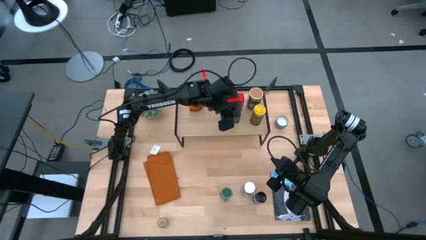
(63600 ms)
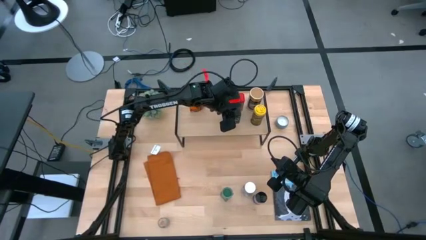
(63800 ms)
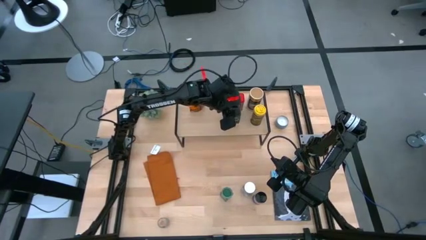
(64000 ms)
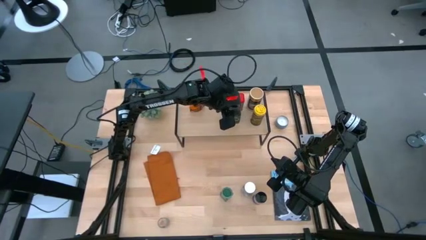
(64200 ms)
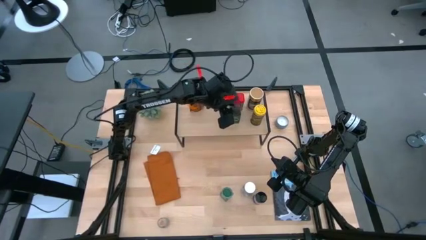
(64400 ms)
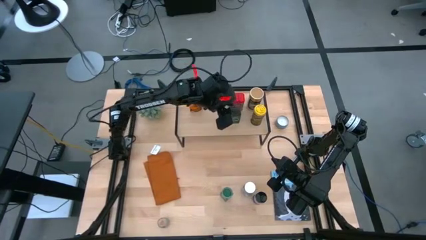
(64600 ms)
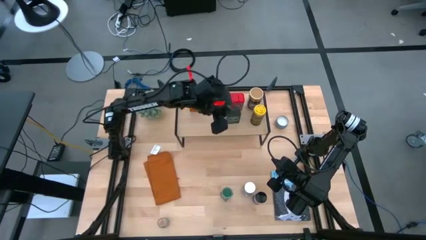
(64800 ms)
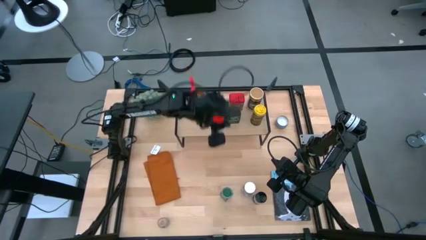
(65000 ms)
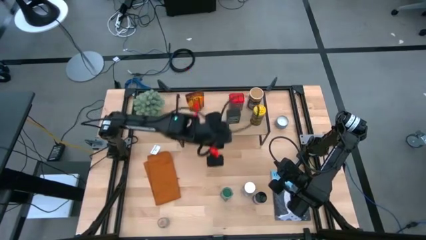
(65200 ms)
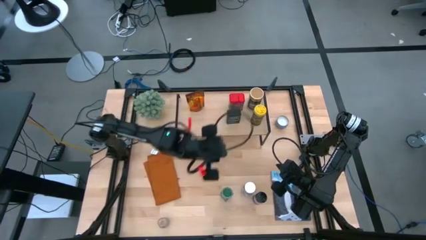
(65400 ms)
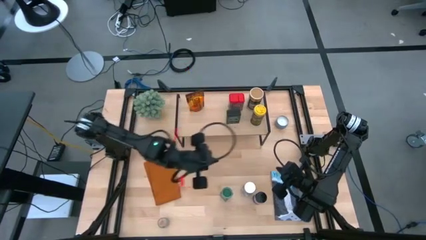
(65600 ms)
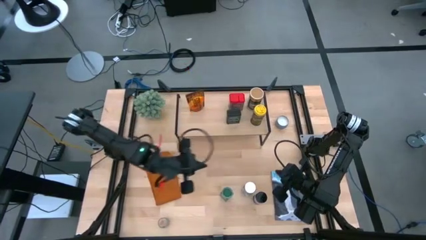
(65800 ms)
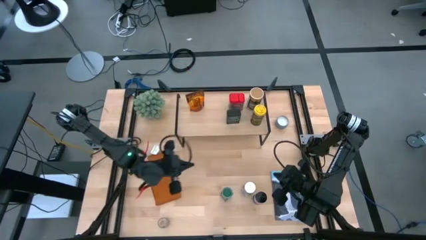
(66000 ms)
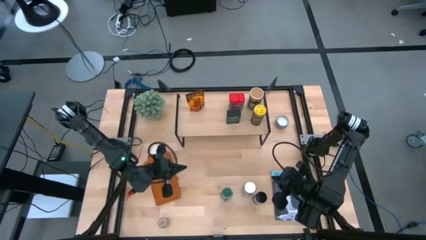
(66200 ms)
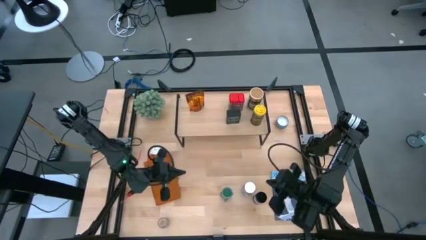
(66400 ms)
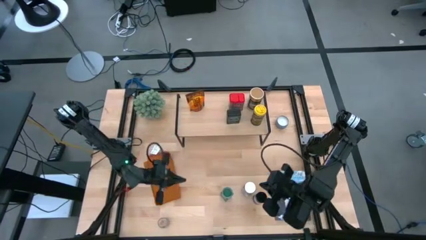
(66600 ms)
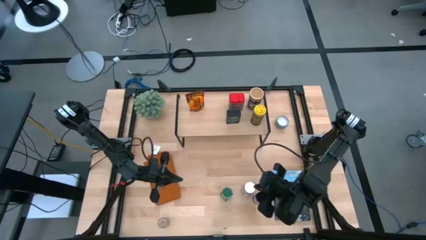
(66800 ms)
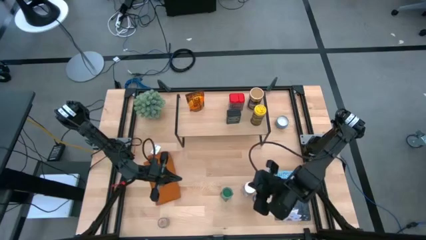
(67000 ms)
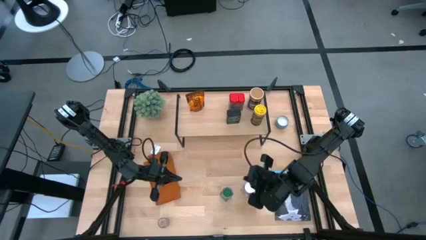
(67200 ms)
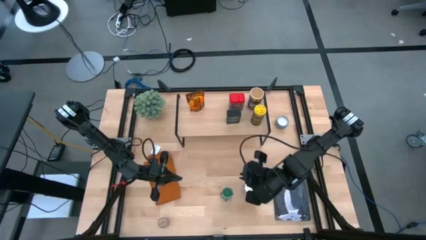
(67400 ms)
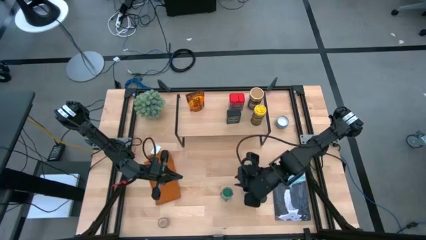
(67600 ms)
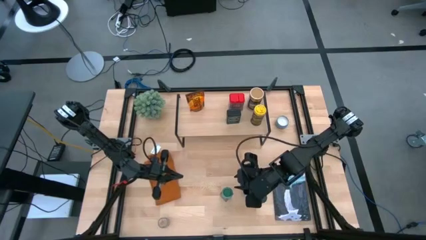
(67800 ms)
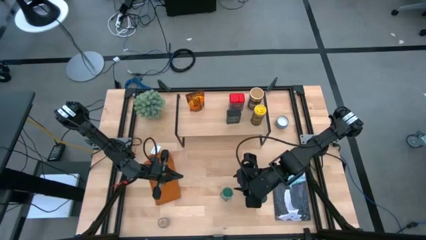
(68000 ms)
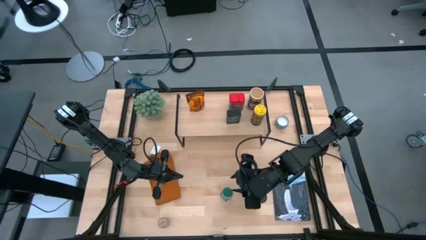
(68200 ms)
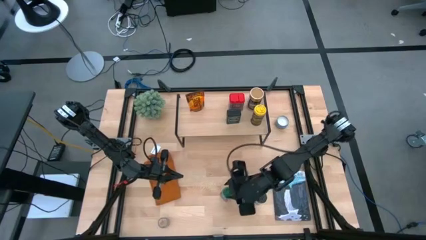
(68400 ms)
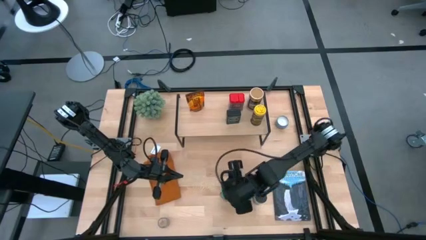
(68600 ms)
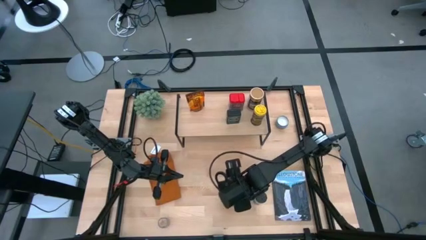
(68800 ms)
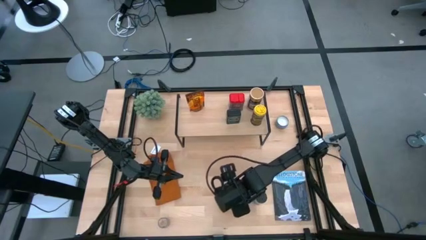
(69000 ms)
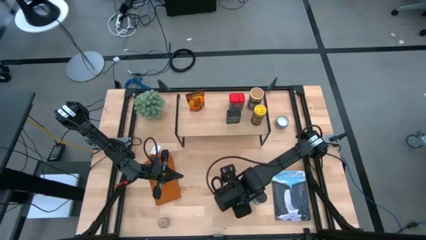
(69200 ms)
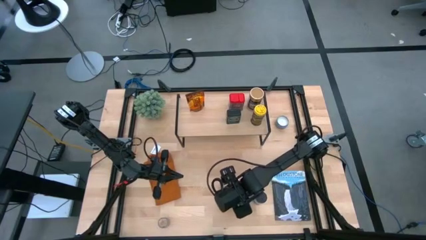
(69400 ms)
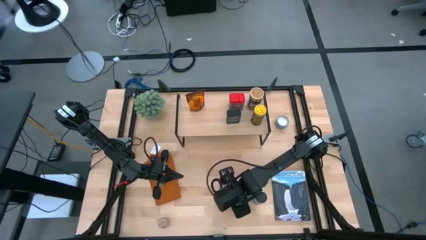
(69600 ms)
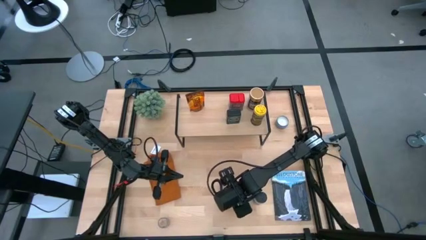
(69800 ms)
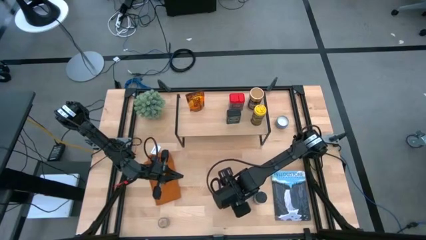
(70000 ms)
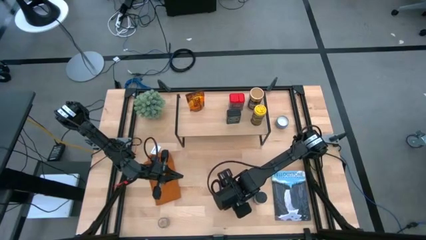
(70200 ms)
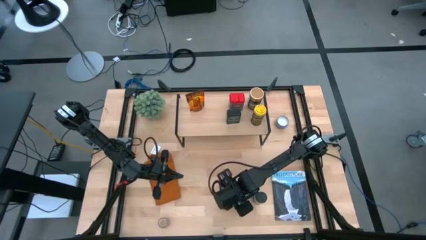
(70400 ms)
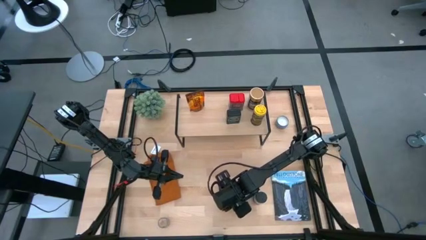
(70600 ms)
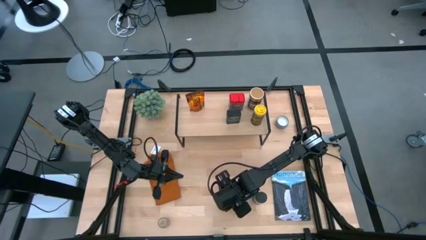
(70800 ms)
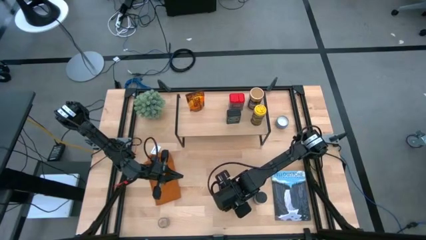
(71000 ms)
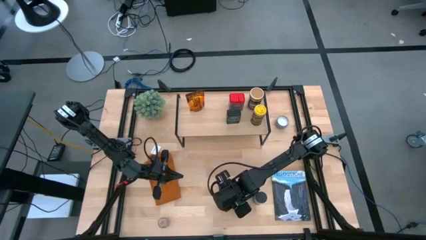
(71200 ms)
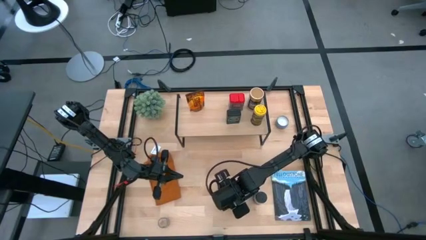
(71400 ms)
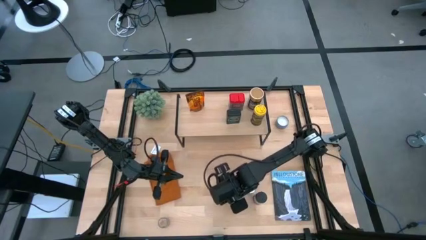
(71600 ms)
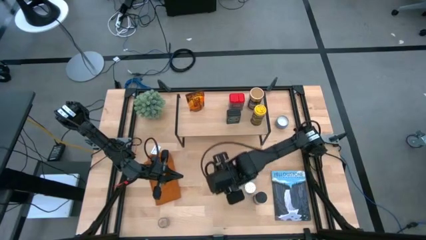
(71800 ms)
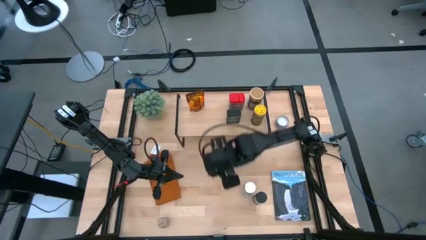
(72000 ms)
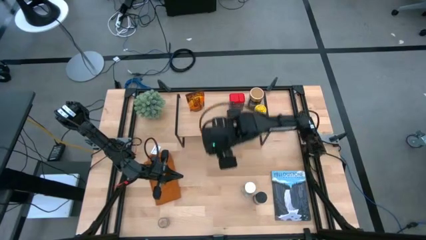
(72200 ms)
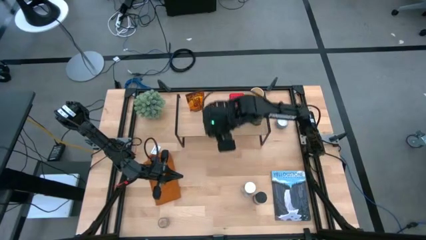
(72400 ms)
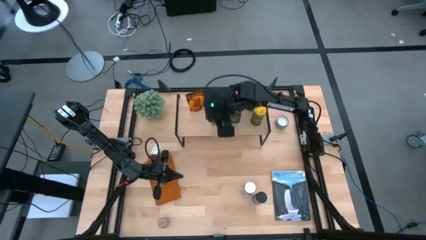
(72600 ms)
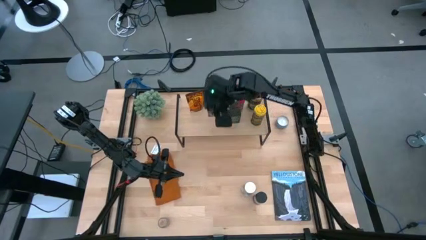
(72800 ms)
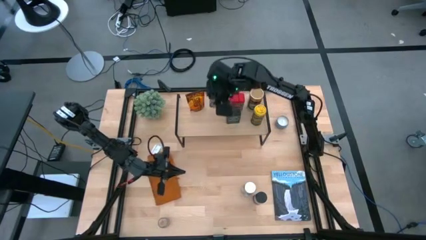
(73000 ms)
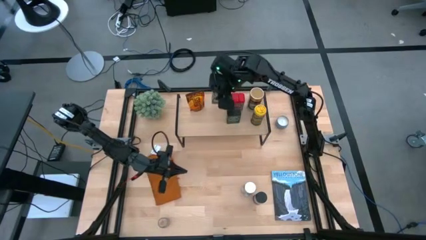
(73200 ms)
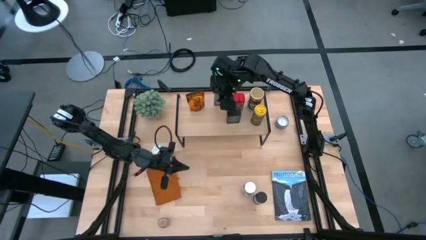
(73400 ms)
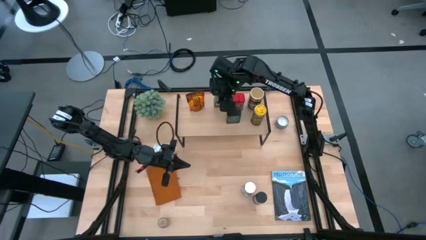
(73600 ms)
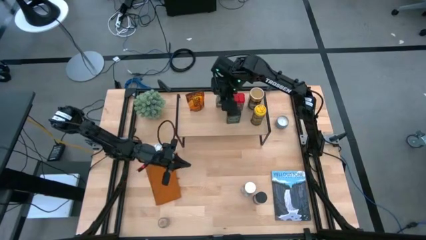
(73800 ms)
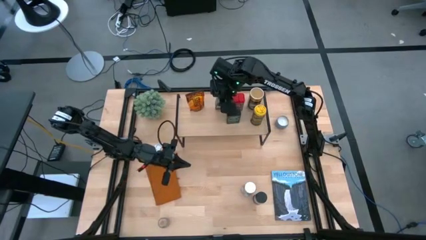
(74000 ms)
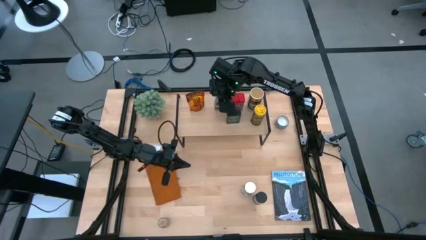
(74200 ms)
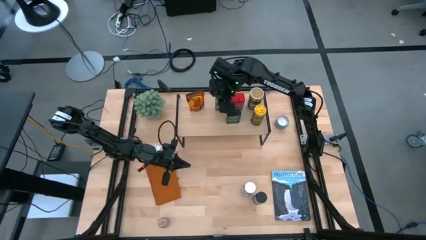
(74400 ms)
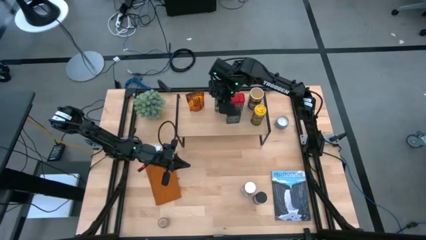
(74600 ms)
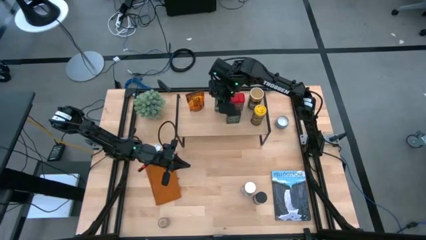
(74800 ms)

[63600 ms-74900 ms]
Task: Shelf spices
Put the green seasoning bottle on the shelf

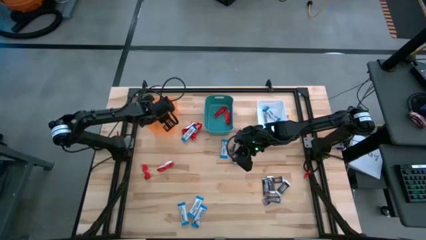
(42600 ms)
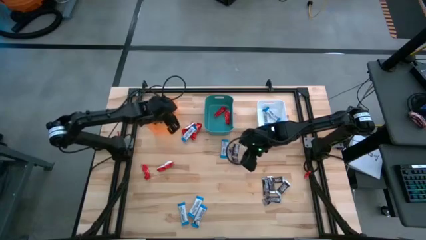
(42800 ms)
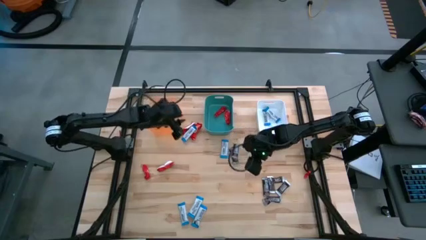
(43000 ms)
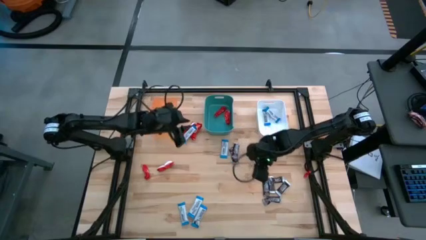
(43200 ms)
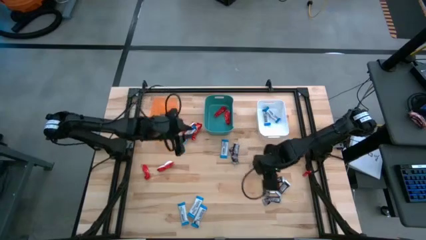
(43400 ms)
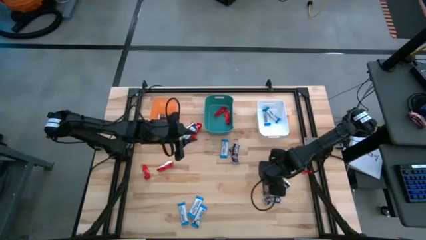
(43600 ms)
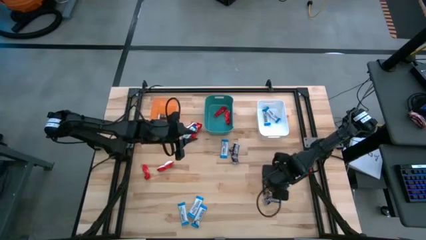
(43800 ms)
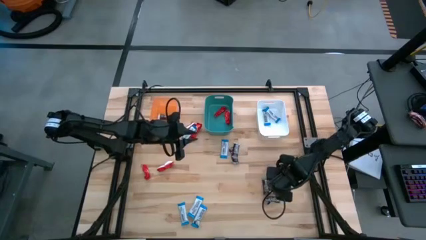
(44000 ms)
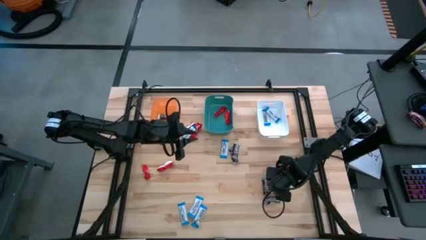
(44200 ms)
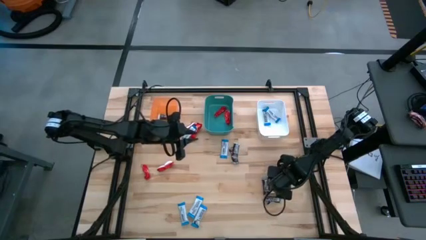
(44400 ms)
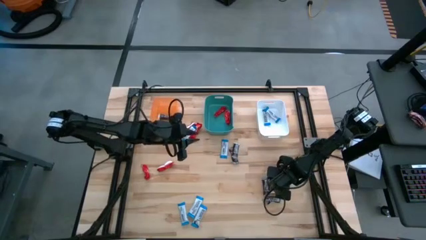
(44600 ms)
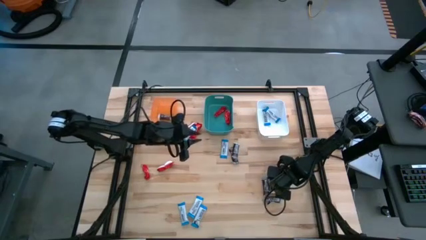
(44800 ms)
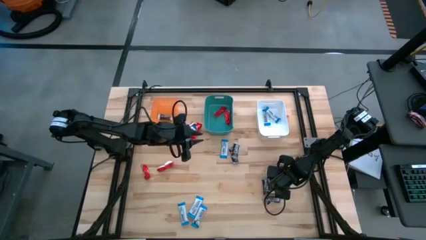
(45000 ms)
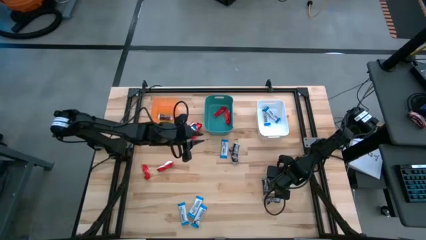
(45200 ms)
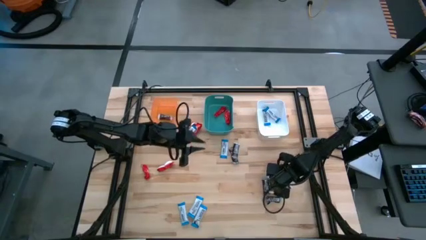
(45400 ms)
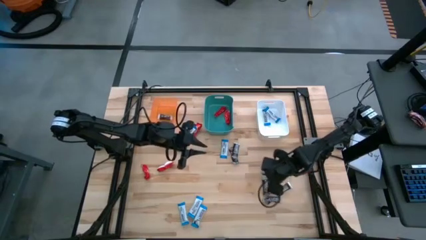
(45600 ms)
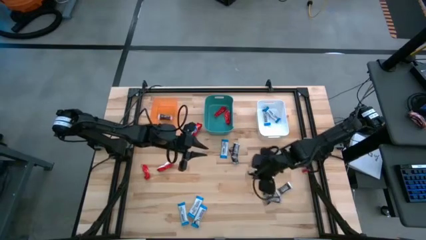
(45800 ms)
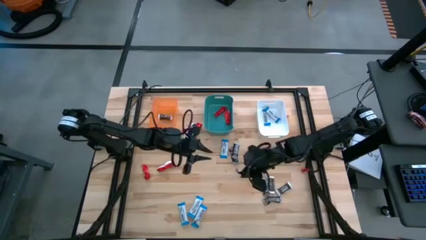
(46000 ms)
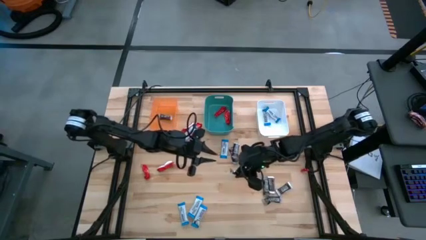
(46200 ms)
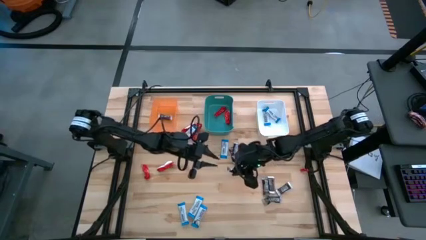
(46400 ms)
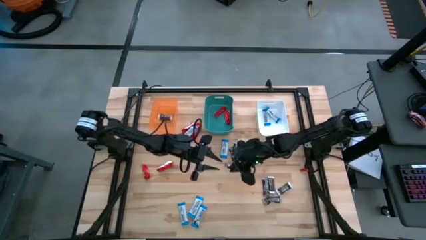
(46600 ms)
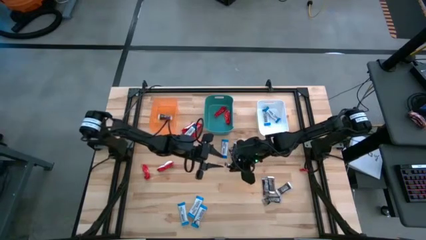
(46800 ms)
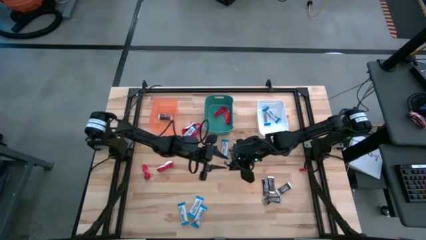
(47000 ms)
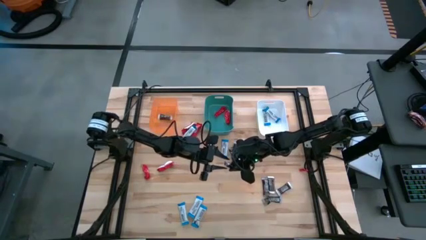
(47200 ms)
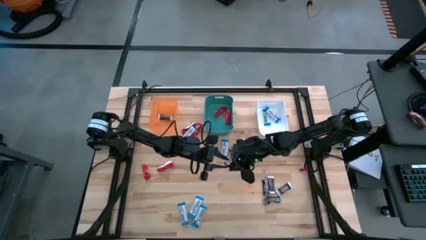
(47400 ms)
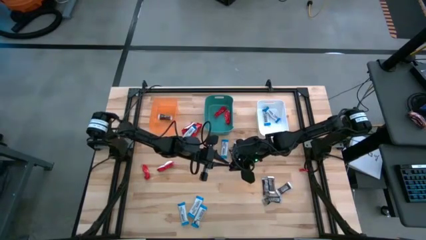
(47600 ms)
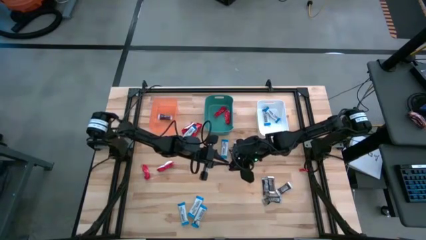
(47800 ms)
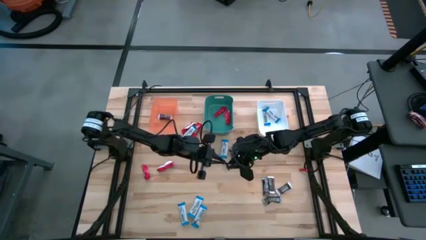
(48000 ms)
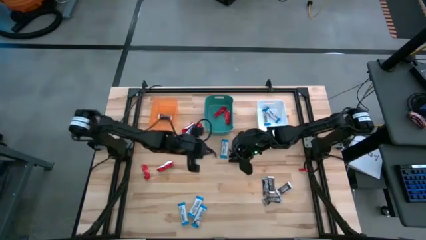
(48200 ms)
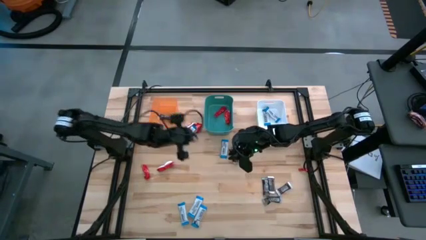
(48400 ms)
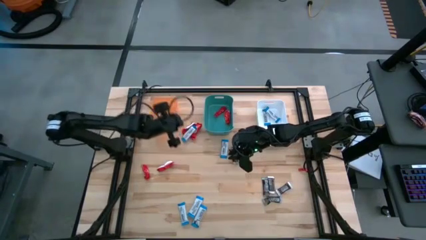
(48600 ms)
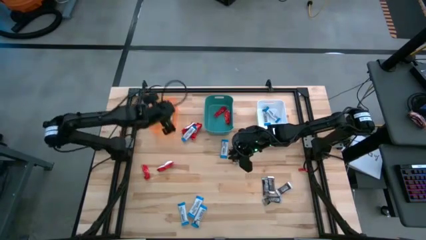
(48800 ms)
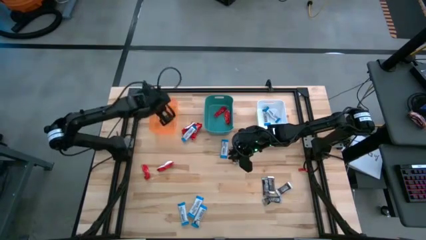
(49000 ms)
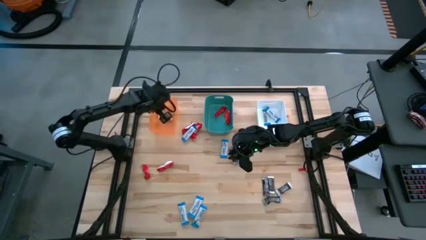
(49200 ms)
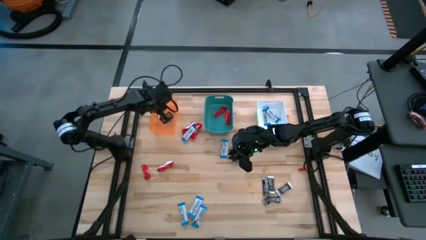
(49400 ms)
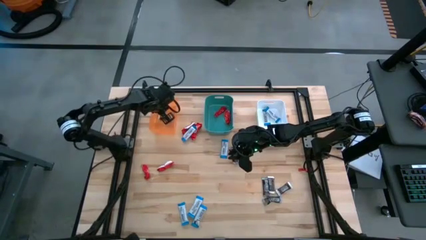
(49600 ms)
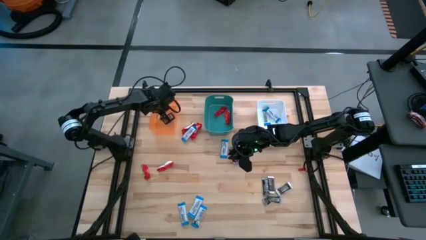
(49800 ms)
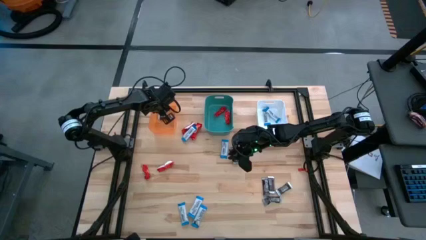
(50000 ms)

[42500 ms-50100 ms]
Task: Organize candy in baskets
Put the black chocolate bar into the orange bin
